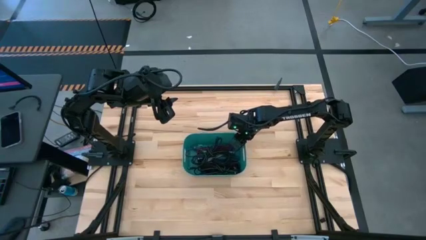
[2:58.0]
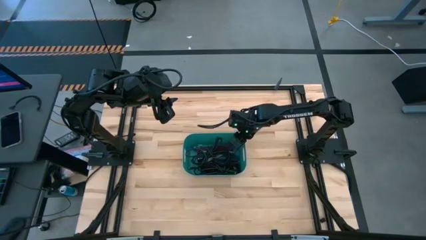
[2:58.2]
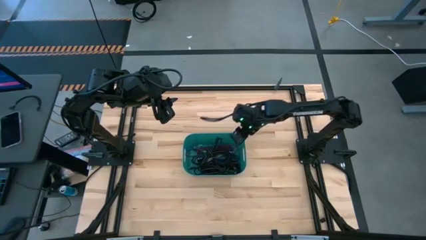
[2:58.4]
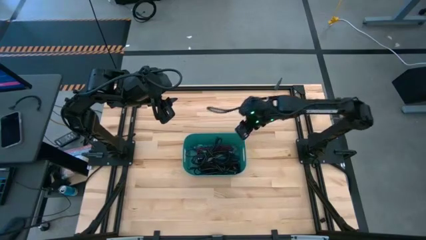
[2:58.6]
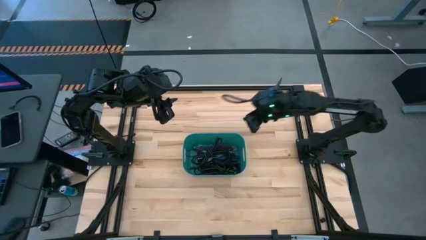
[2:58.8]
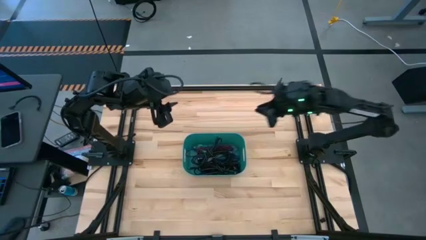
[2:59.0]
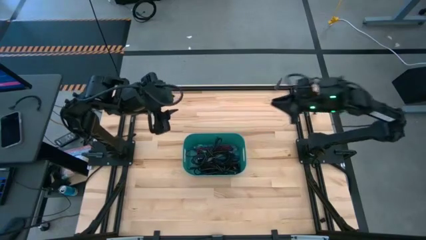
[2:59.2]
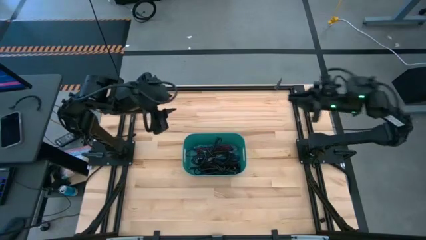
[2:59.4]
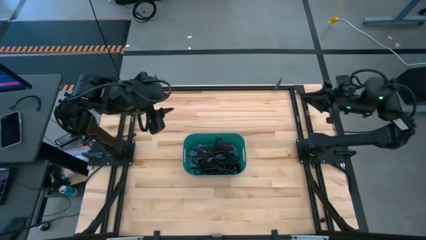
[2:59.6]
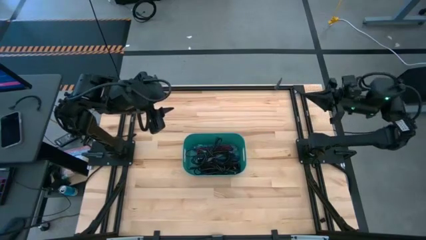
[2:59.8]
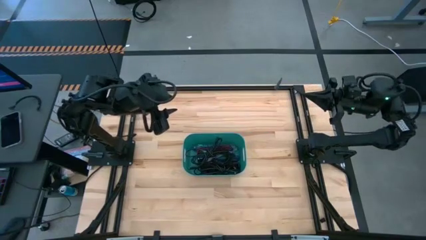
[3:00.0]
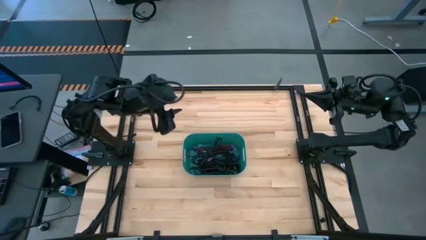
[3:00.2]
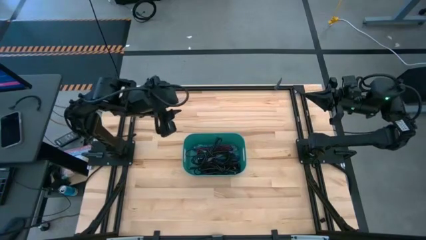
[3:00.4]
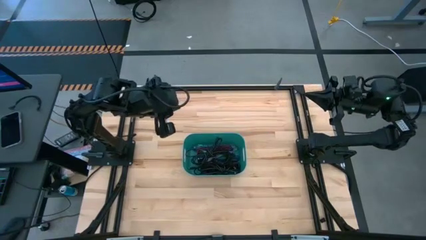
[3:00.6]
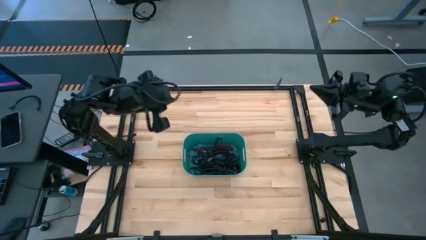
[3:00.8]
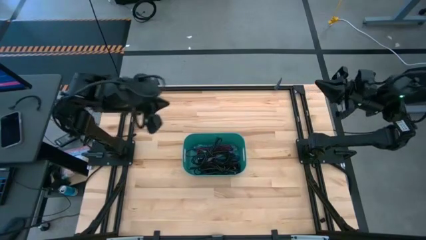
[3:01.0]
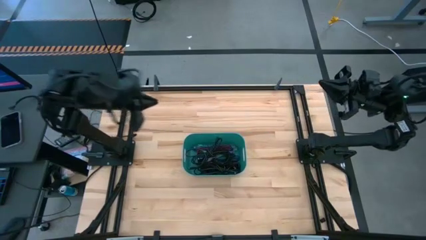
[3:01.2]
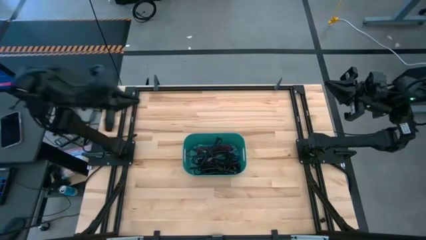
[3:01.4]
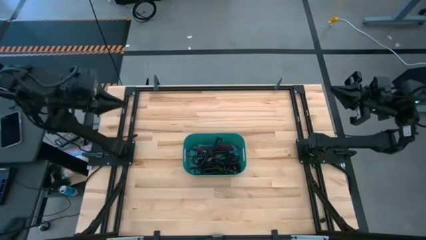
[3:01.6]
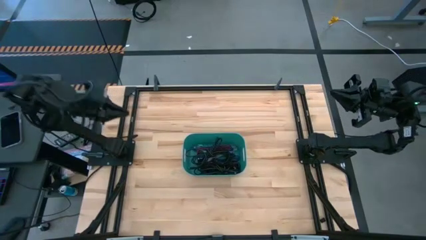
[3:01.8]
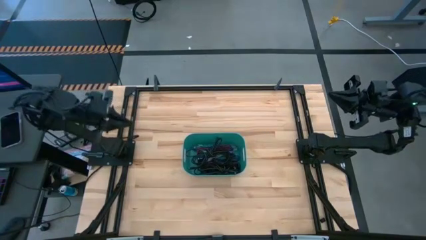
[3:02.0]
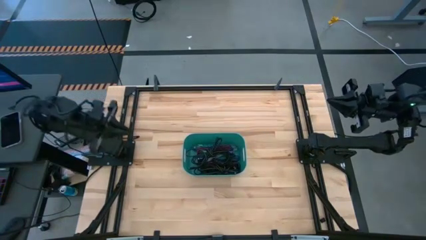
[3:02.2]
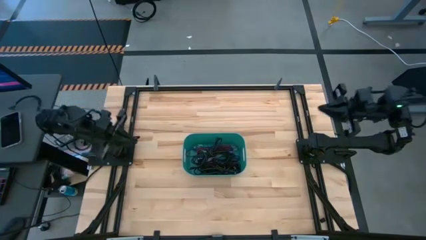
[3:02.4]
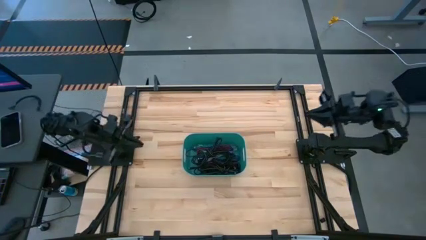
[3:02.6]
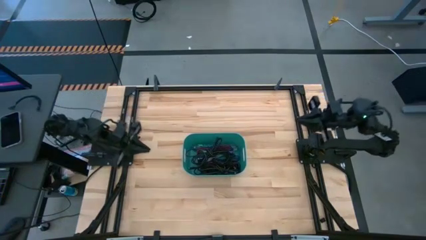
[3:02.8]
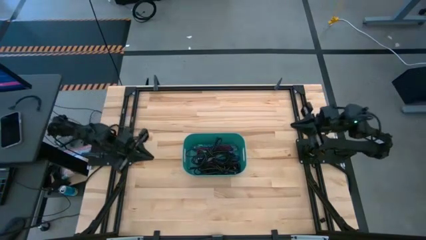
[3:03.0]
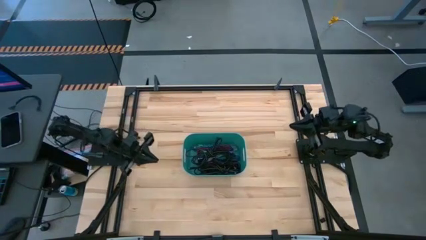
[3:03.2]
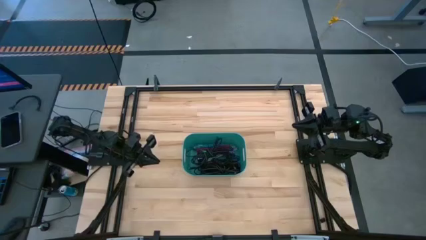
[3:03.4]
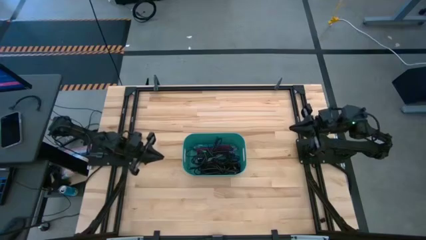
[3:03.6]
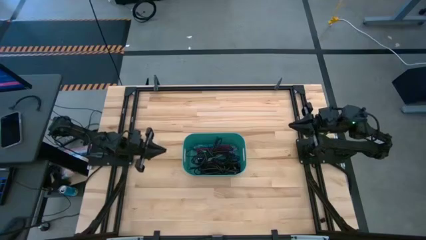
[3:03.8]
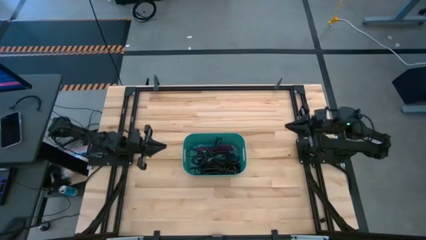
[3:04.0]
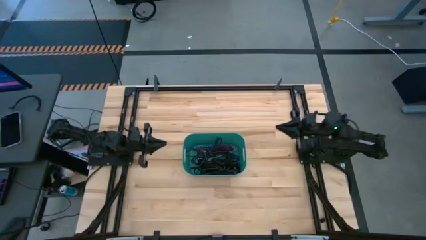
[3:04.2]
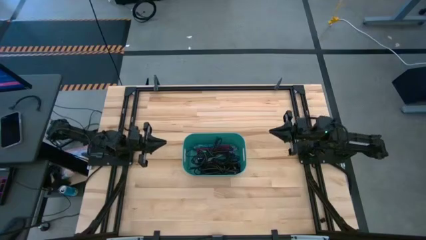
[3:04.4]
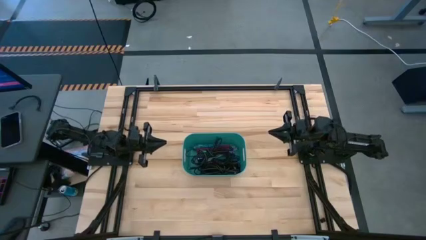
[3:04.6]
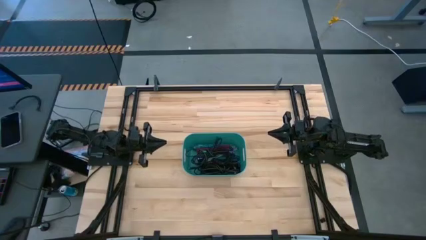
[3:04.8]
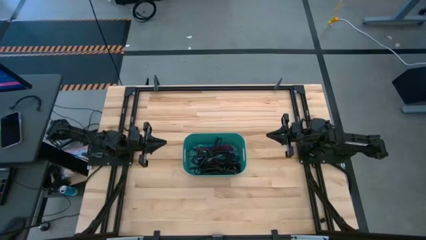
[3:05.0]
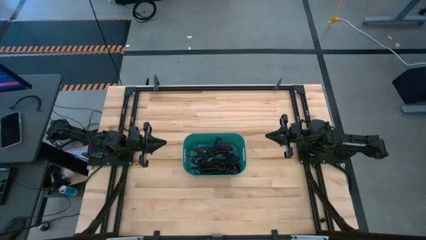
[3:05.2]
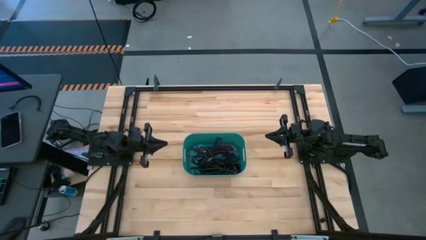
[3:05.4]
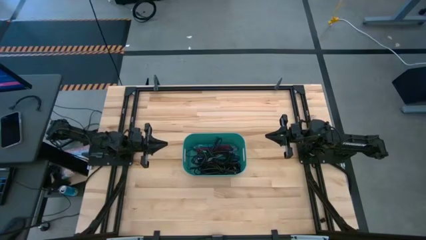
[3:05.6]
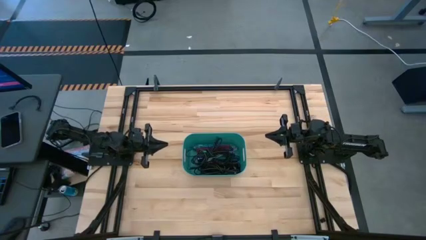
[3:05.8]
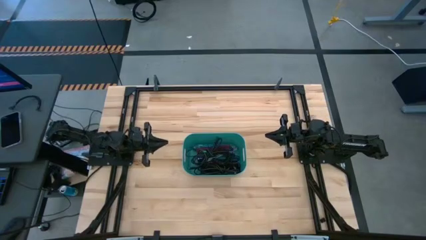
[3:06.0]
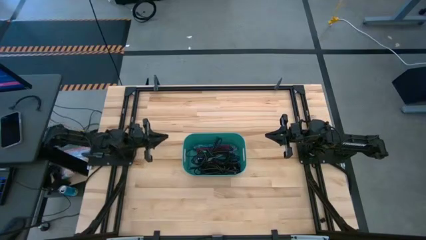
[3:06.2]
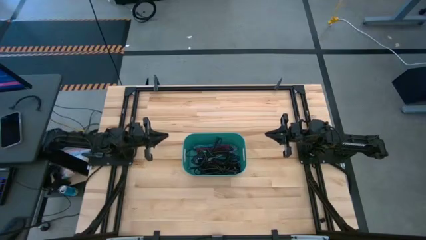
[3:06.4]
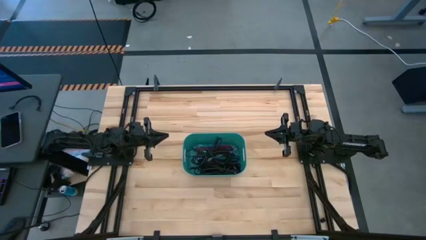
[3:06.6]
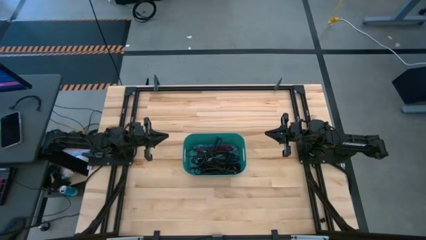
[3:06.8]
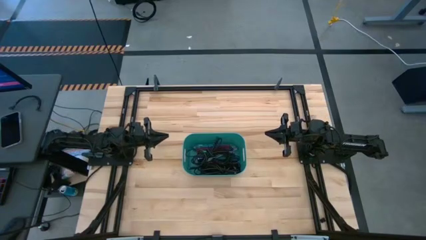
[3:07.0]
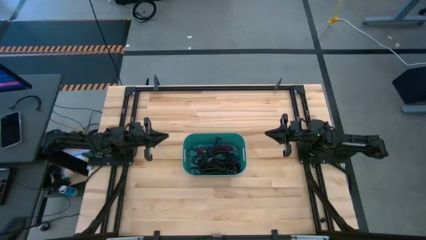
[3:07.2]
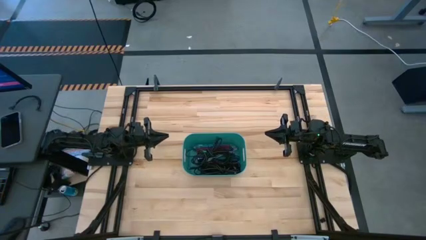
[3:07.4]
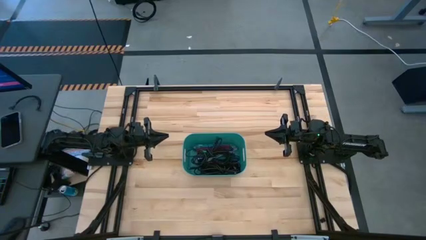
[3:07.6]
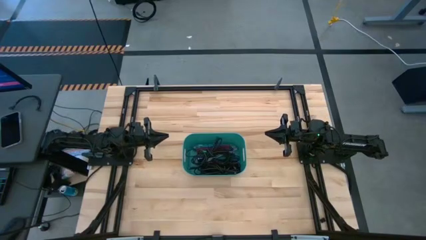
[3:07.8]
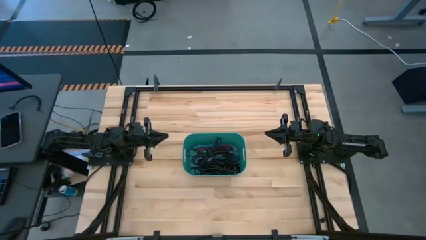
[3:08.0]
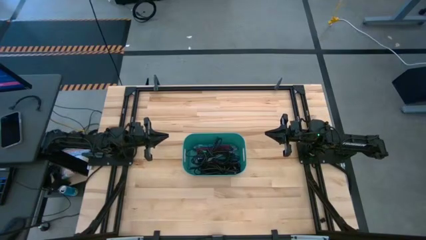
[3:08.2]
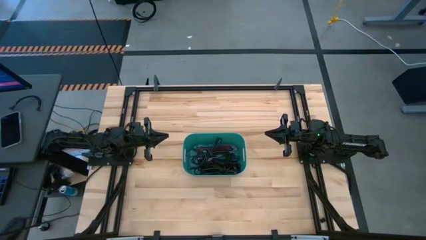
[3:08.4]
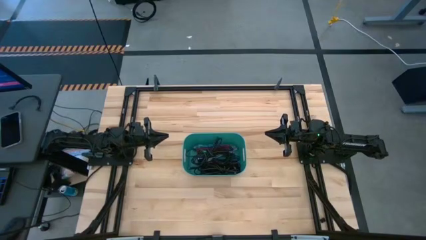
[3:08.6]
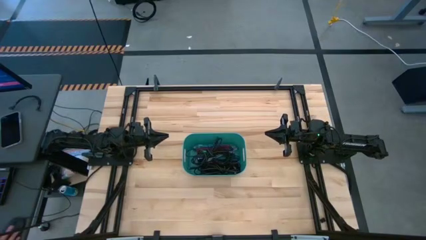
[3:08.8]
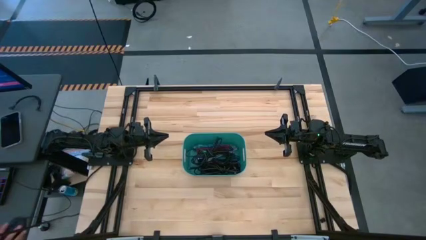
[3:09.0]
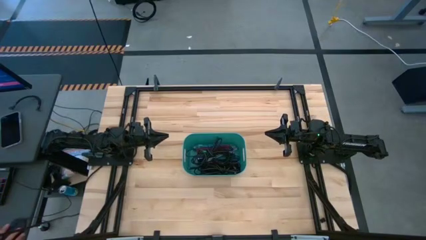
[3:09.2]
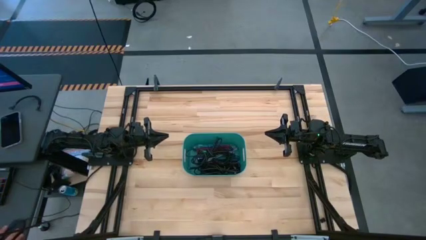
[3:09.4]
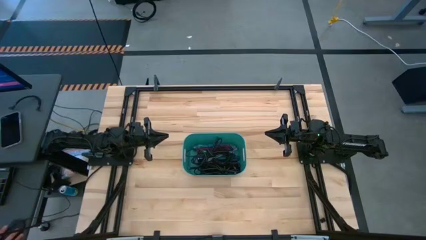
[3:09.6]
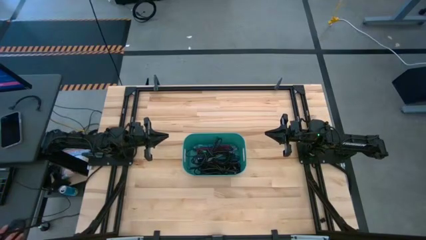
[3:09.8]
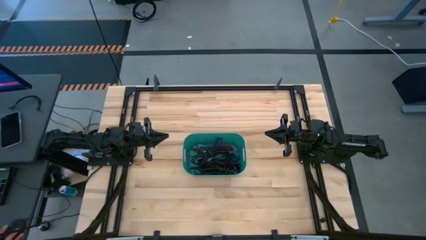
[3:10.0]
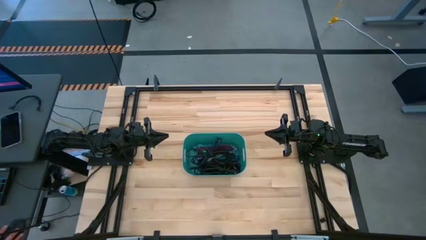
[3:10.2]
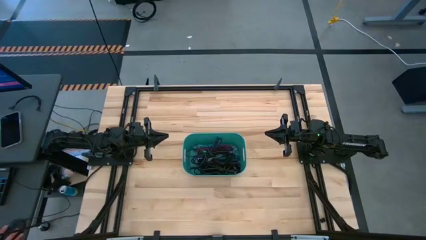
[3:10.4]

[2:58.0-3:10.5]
Task: Pick and place USB-C Cables
Return to Home Position

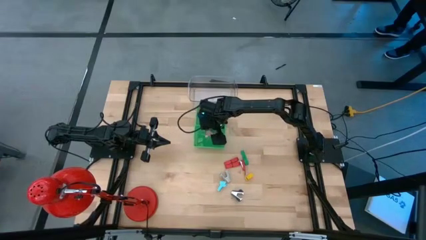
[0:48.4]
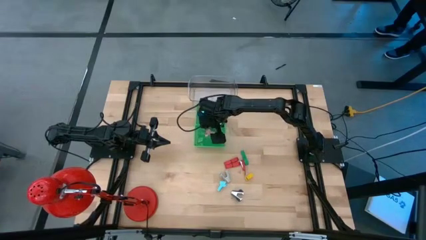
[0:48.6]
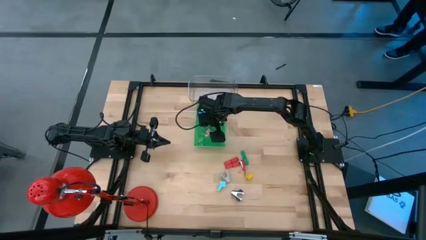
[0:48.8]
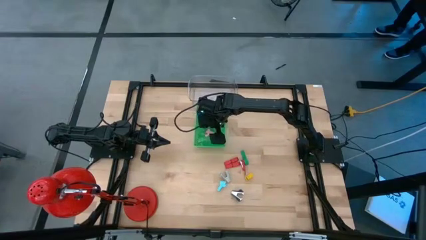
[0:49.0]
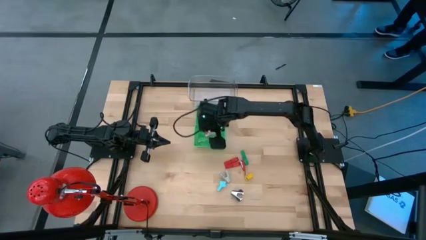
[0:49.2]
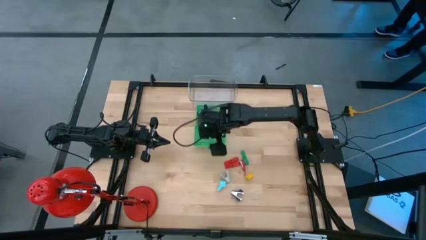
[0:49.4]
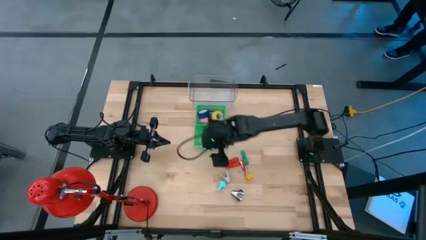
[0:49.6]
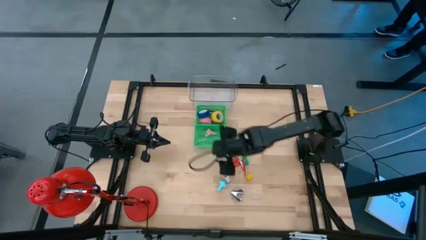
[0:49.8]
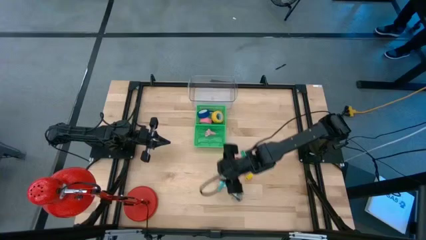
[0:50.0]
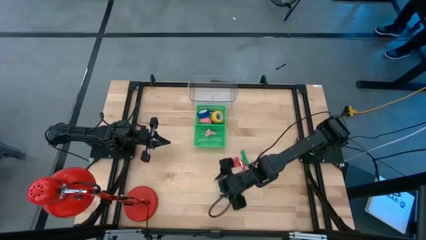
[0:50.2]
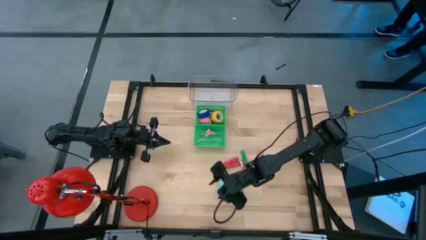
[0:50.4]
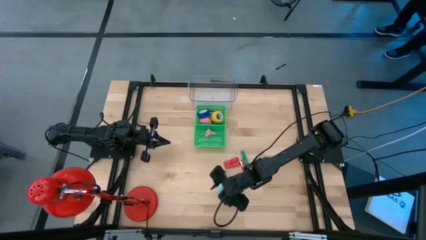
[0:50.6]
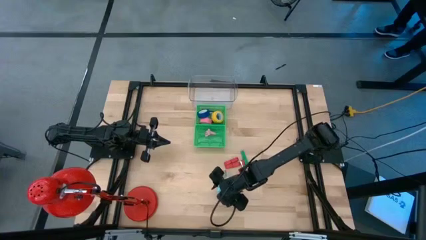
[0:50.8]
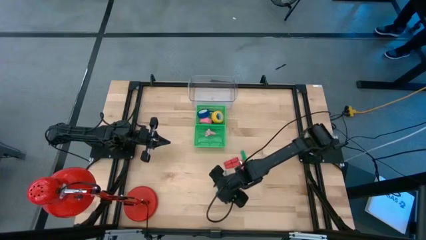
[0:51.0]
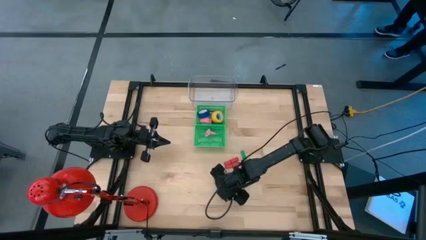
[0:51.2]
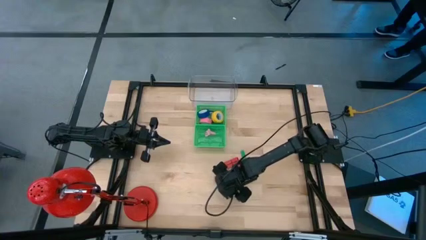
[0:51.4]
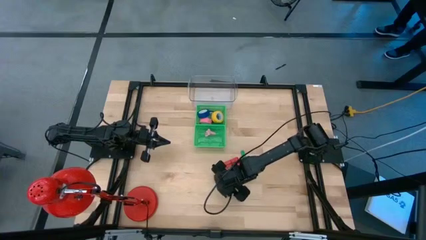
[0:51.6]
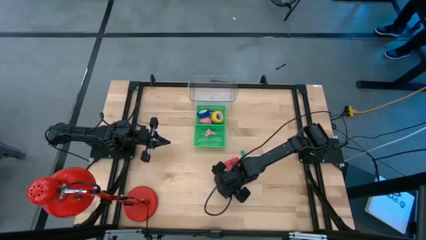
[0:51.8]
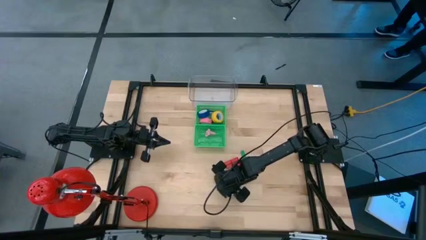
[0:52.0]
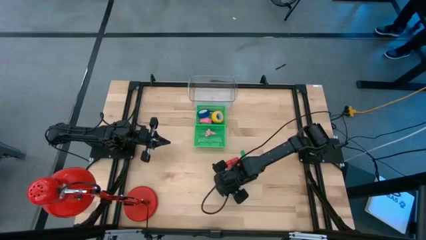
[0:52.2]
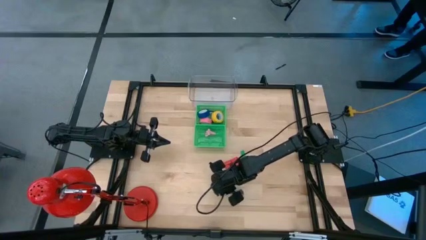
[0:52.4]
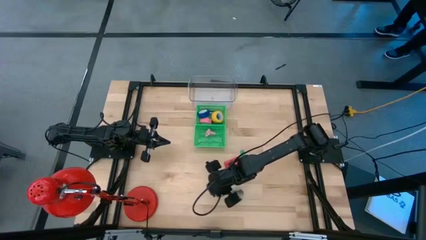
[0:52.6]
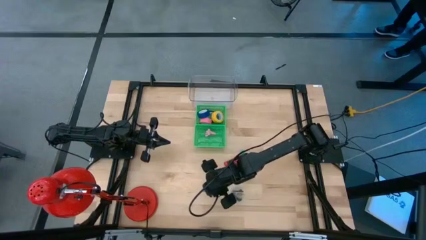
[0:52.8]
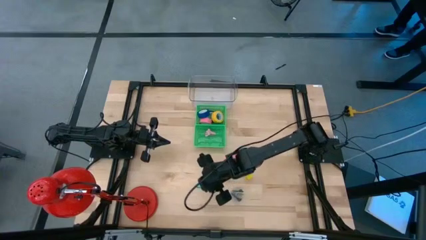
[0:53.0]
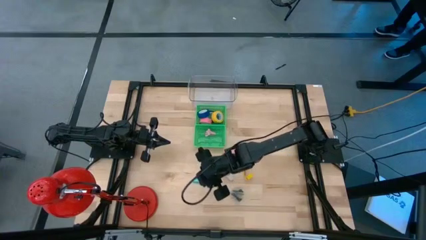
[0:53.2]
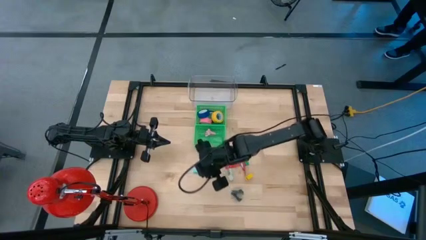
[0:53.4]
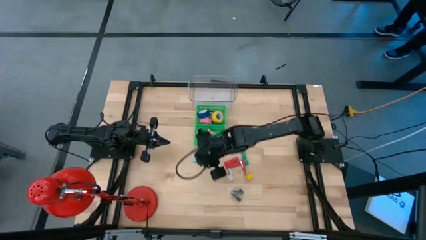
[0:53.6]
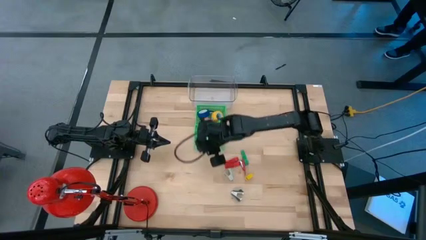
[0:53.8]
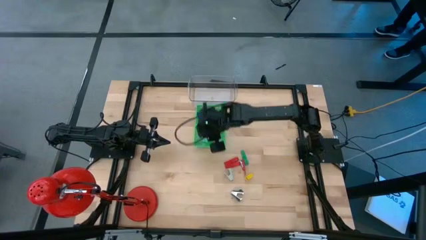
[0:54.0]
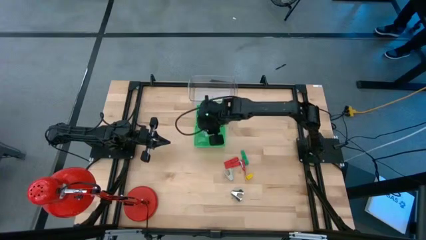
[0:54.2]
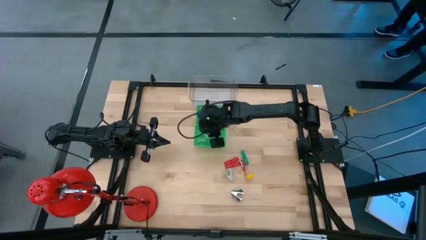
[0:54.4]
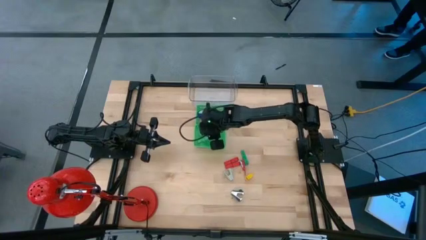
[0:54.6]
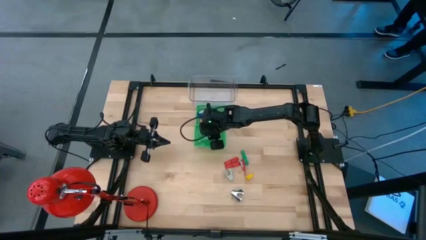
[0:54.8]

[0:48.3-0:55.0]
Task: Pick and place Stapler, Stapler remover, tape
Put the light blue staple remover into the bottom green bin
